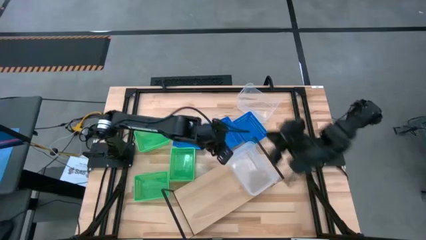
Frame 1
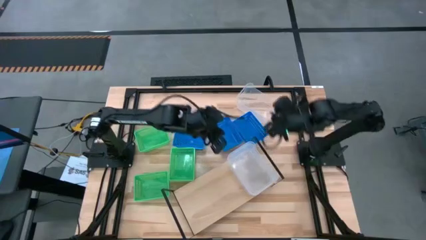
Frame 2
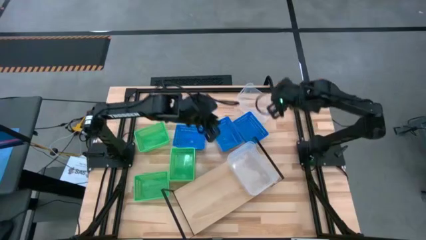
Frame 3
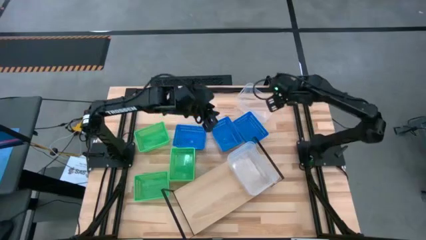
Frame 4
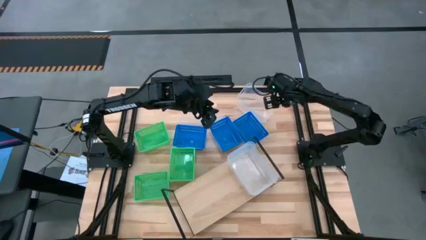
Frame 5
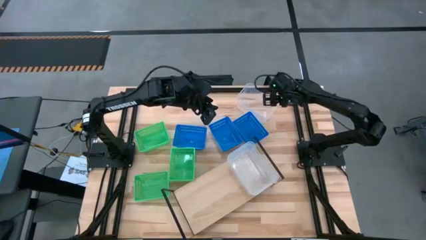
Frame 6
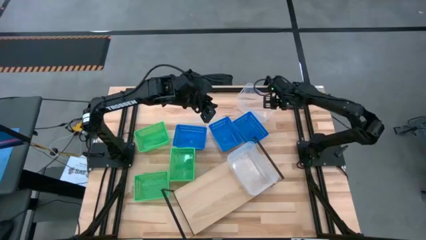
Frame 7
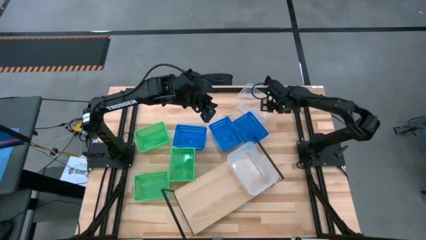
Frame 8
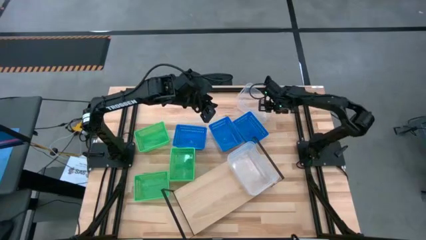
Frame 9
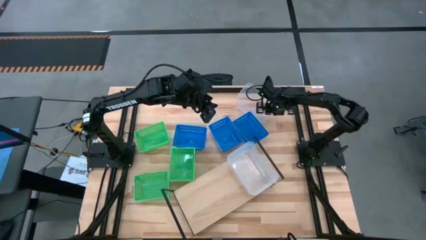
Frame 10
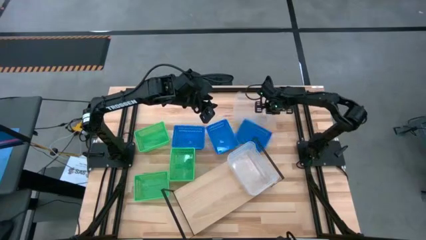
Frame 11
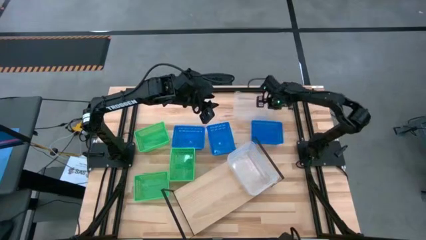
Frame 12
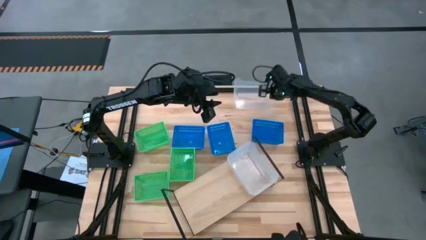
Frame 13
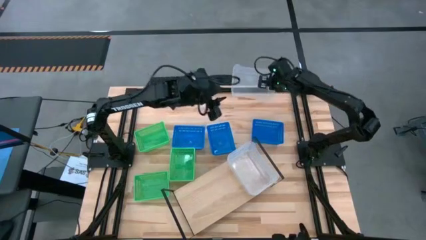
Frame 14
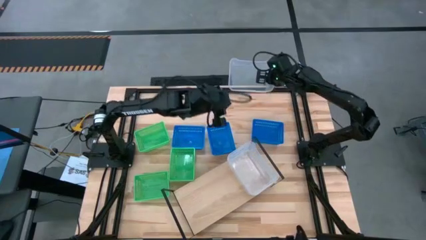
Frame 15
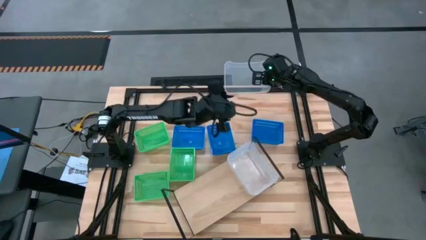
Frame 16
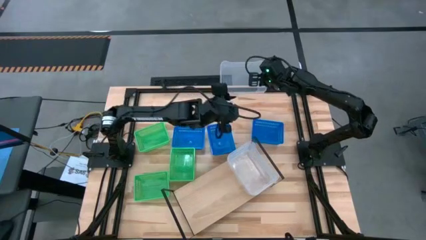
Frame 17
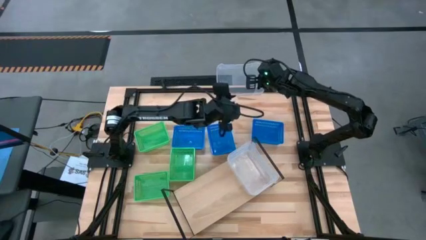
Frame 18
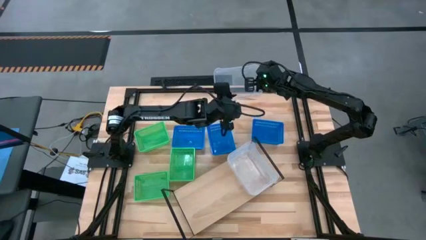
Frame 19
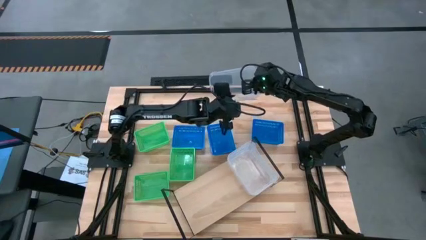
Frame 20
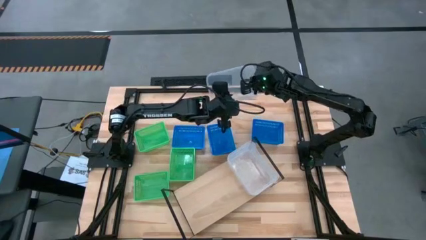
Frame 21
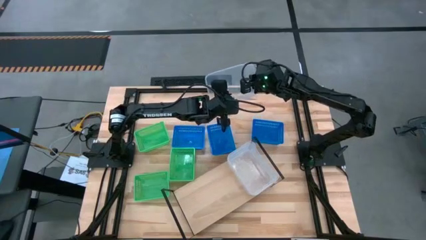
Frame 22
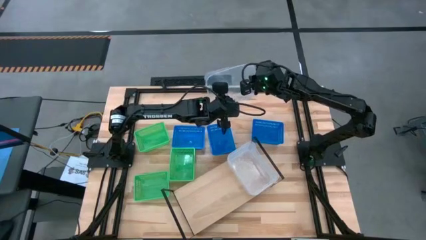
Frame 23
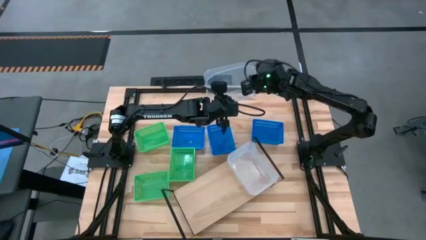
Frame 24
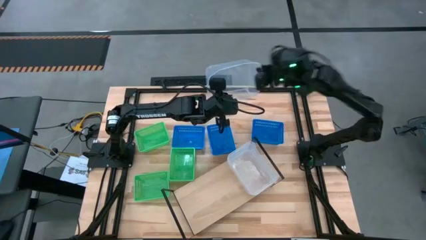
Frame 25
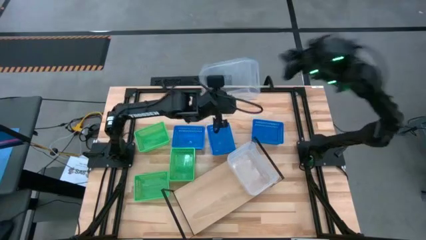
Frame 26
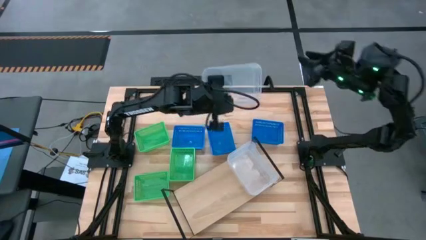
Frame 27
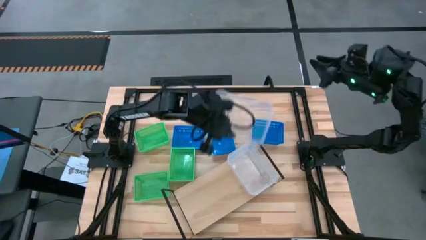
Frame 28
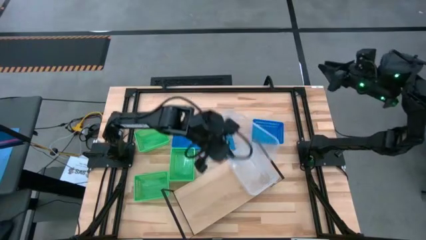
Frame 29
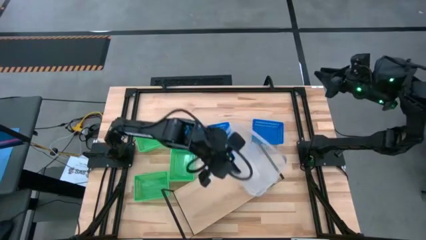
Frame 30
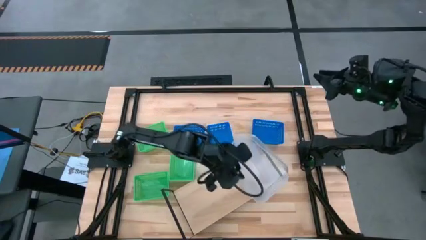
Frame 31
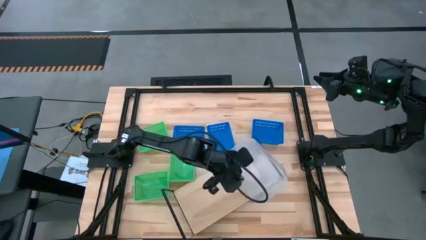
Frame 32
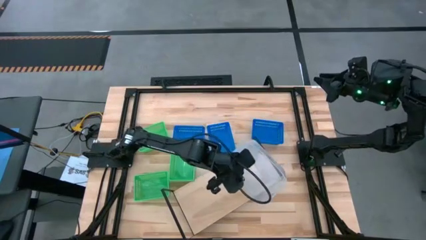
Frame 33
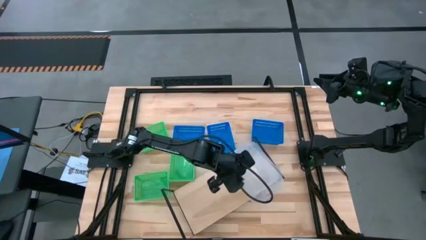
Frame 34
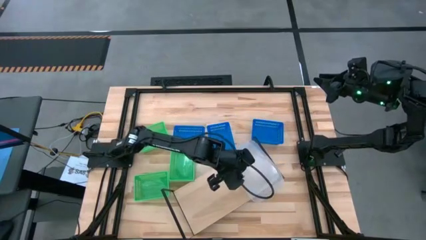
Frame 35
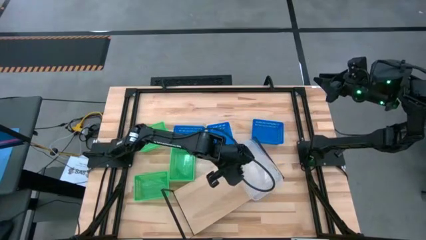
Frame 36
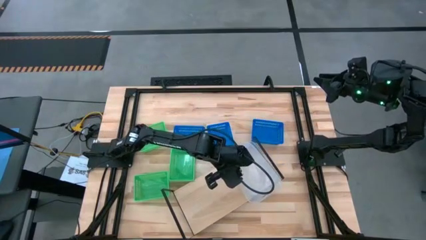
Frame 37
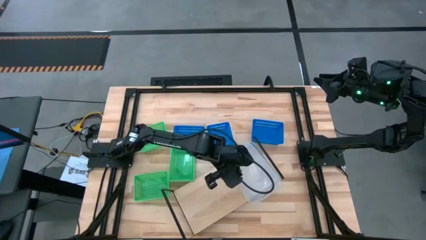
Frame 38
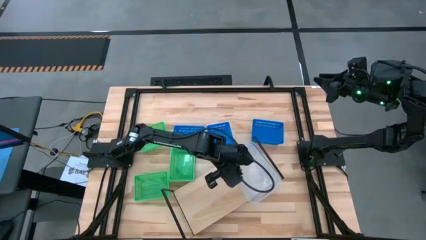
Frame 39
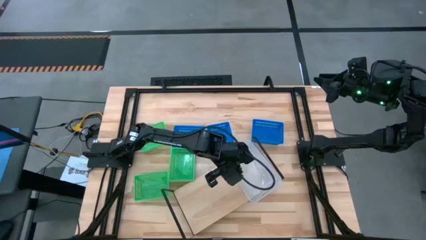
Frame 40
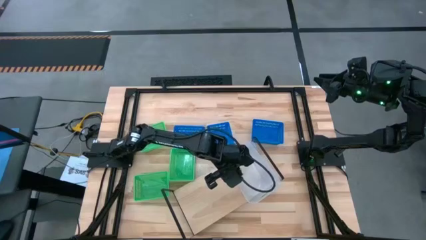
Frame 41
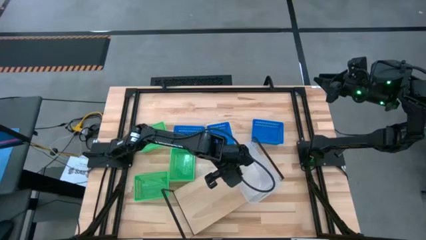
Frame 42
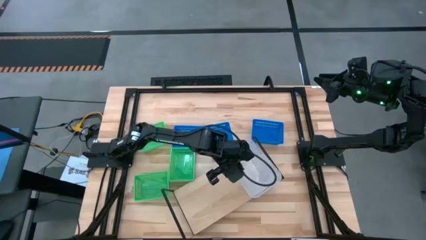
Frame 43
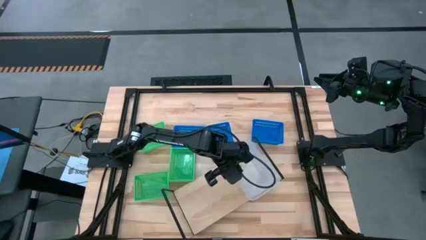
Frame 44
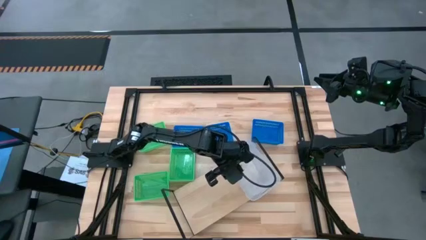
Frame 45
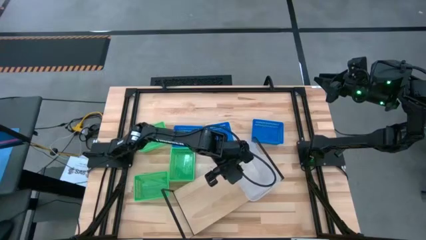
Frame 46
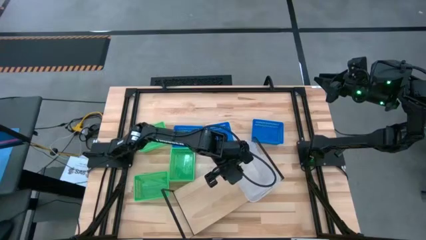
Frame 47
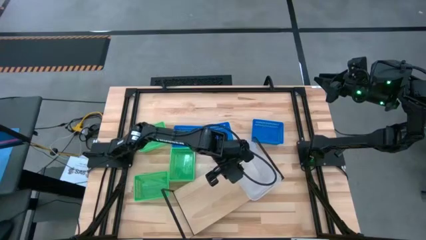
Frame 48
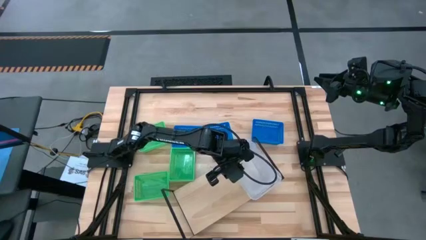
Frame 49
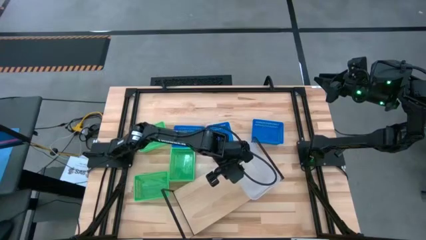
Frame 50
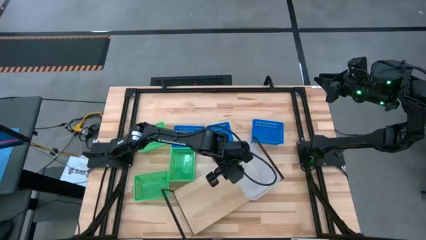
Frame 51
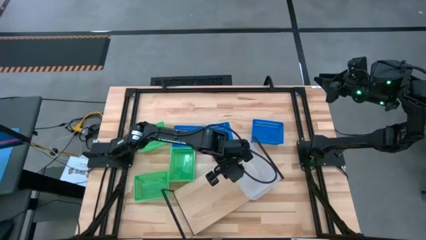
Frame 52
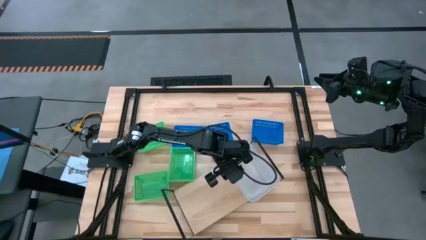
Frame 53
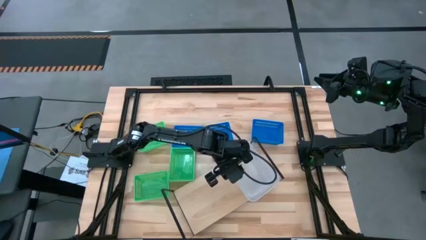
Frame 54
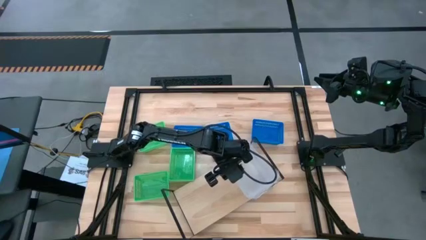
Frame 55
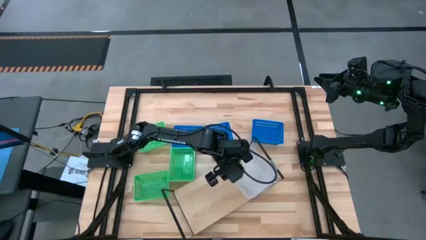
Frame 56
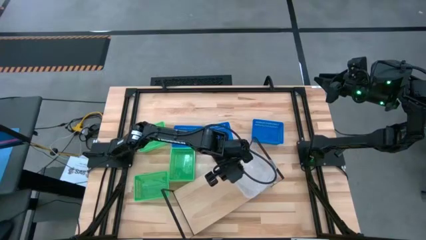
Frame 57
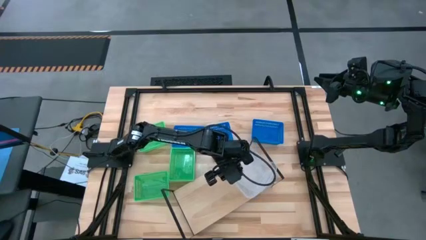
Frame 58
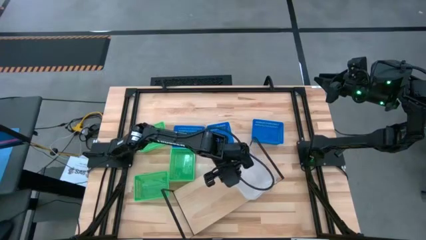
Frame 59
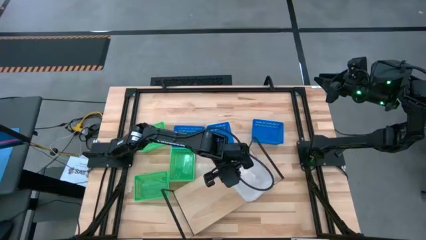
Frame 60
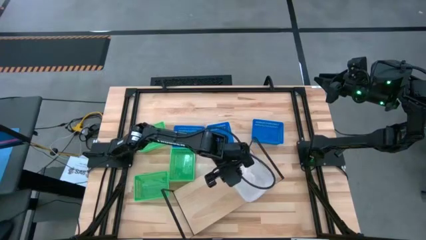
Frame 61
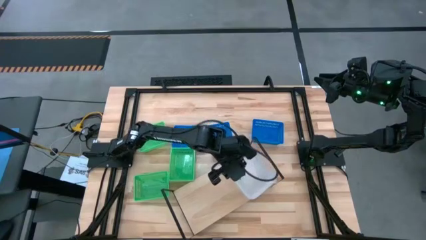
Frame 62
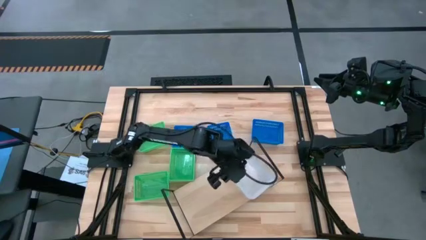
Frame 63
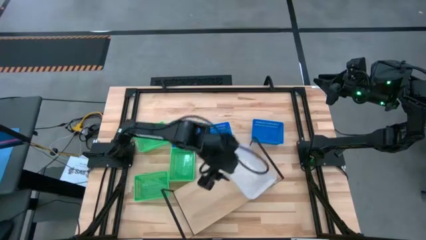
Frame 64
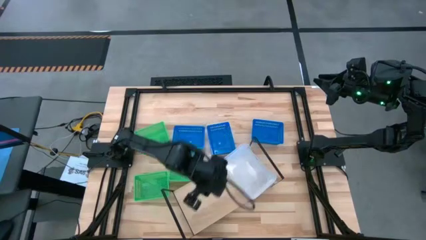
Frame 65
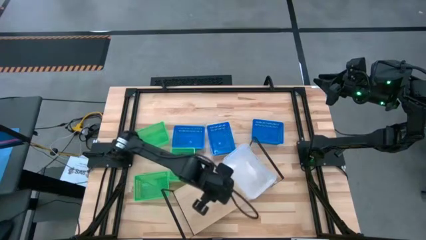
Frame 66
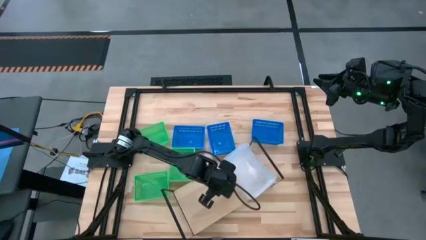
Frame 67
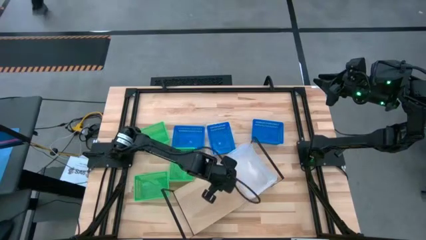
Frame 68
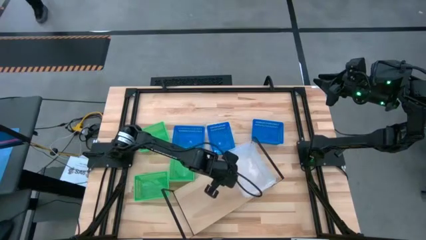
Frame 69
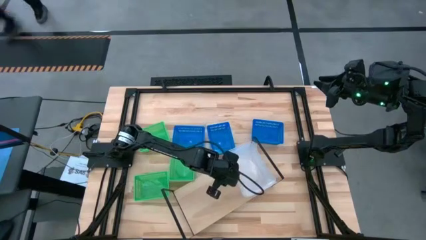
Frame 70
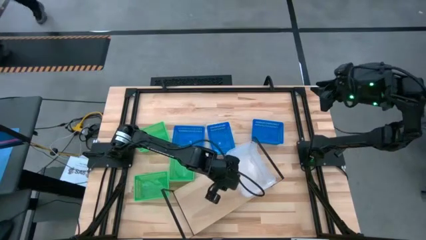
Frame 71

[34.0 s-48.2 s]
Task: Stack baskets on shelf by color
Stack the transparent bin on top of the other transparent bins on the shelf

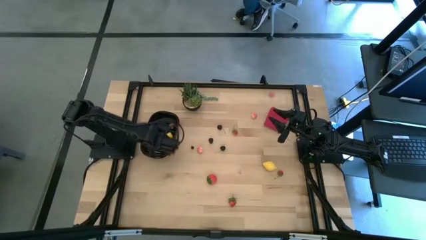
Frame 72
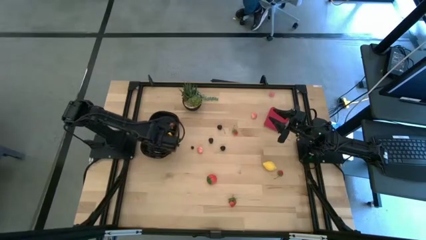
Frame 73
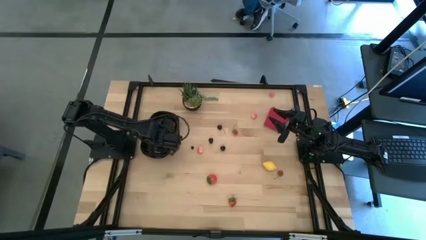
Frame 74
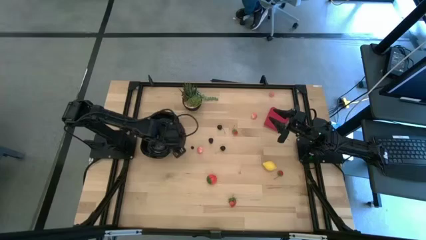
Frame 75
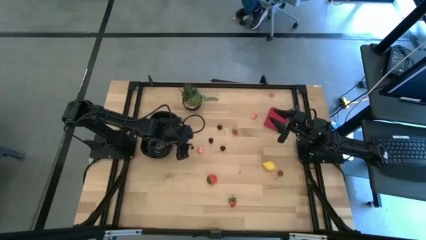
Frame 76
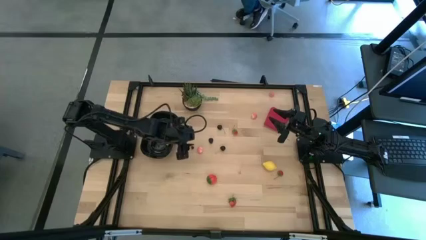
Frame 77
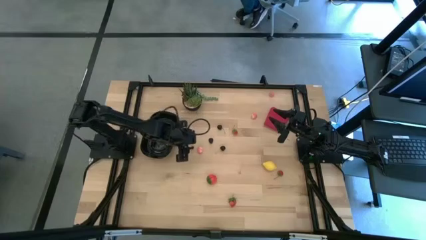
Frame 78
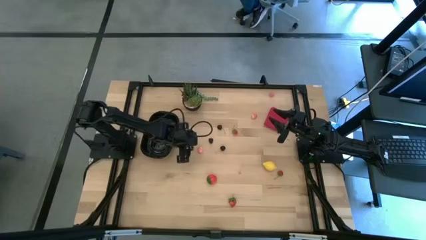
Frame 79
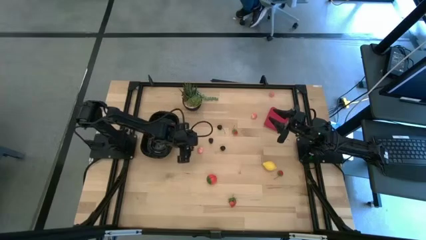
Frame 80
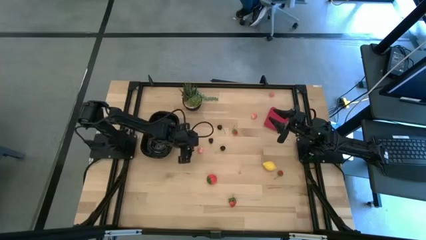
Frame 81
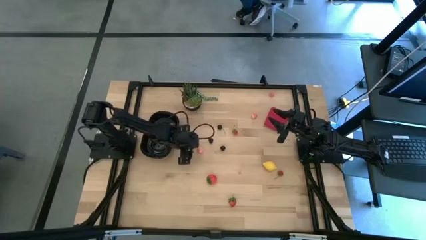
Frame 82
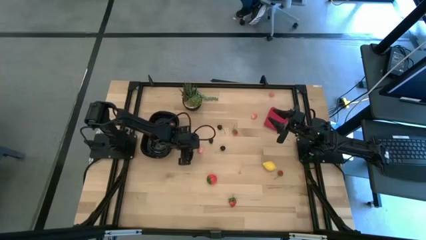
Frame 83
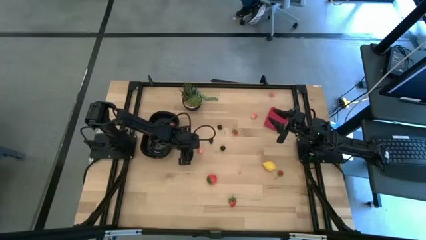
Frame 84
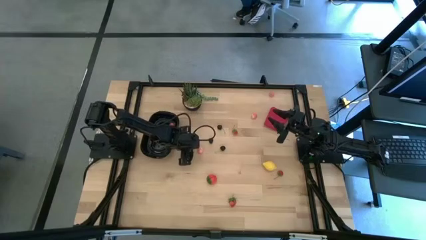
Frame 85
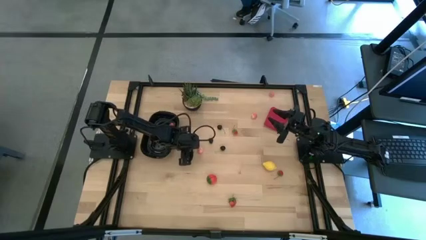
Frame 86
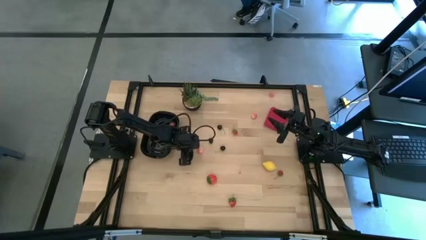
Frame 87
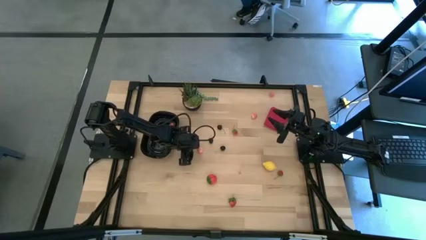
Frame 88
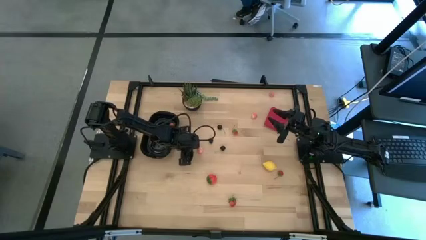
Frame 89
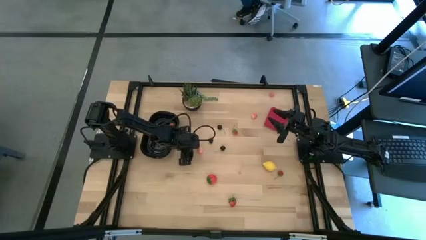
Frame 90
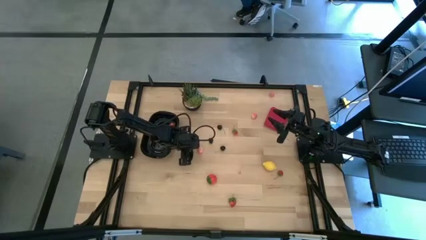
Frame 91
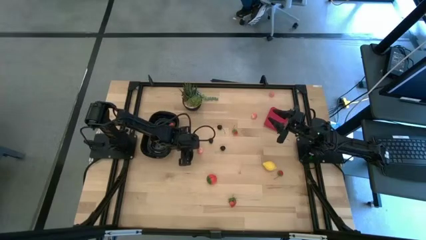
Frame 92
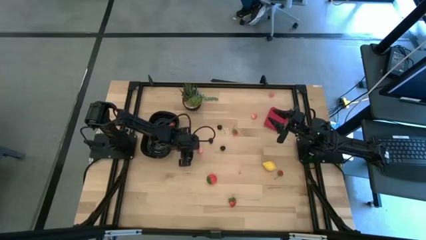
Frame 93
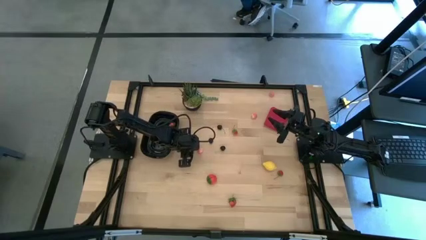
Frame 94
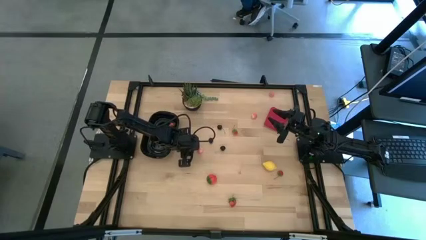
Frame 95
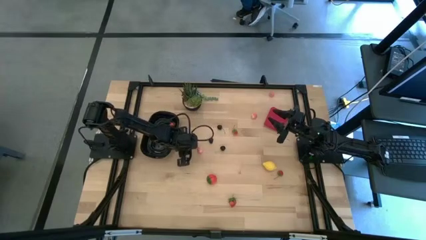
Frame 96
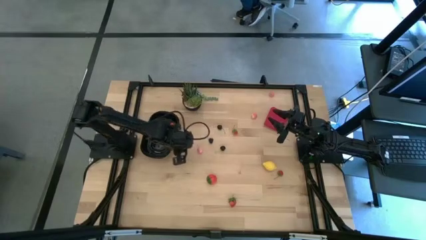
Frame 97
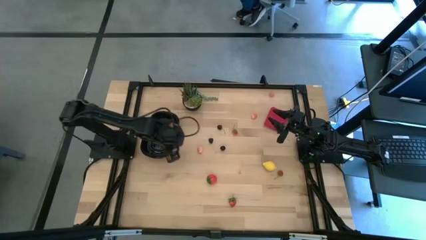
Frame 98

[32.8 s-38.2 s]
Task: Pick and placing Produce into tupperware
Put the blueberry into the black container
